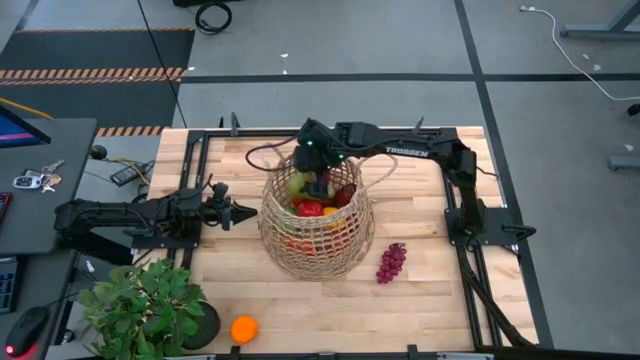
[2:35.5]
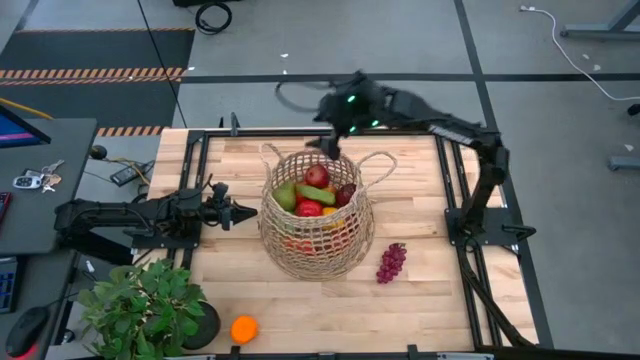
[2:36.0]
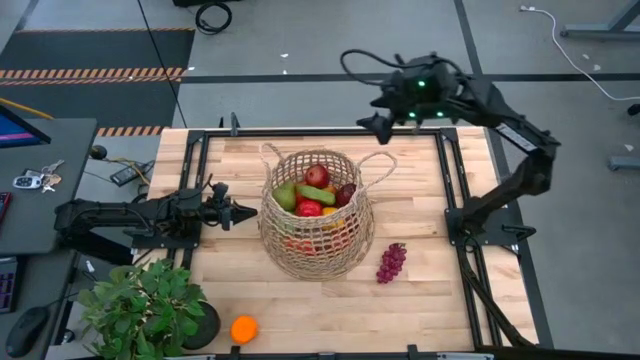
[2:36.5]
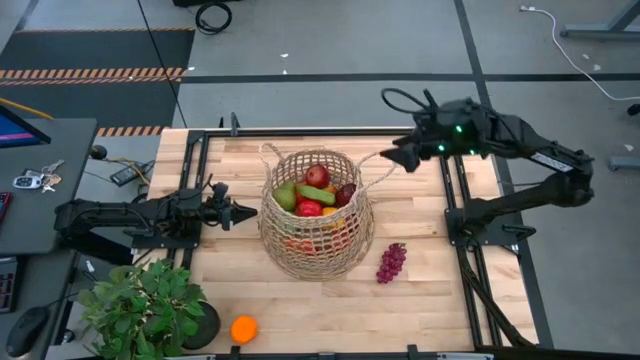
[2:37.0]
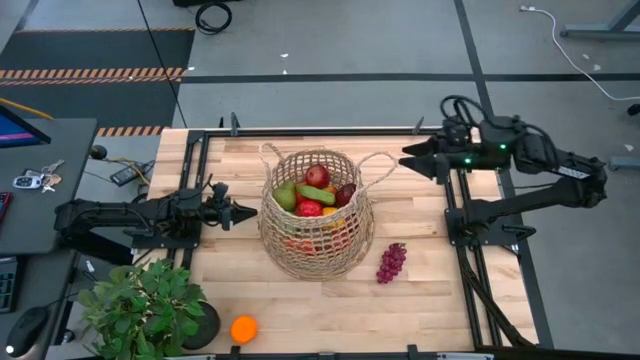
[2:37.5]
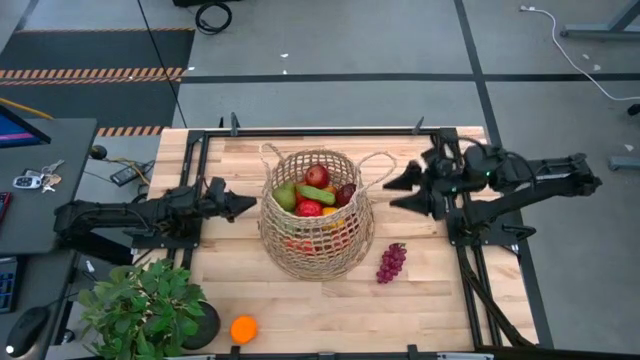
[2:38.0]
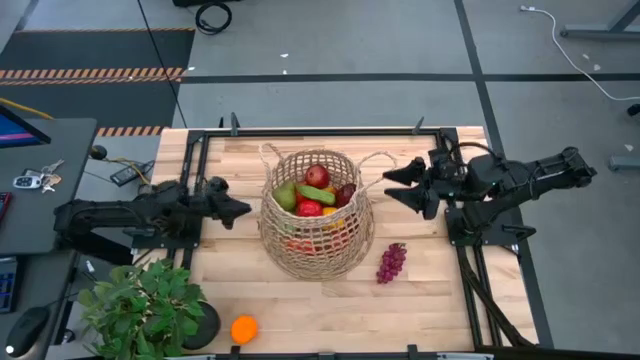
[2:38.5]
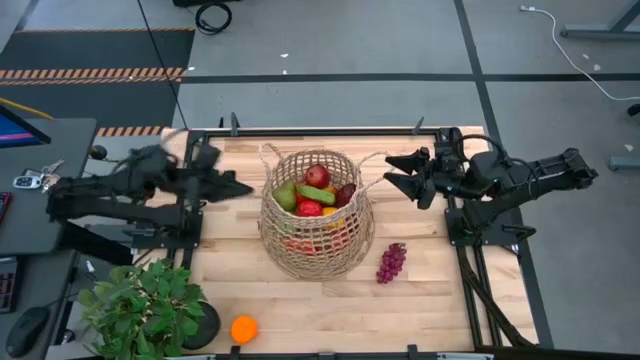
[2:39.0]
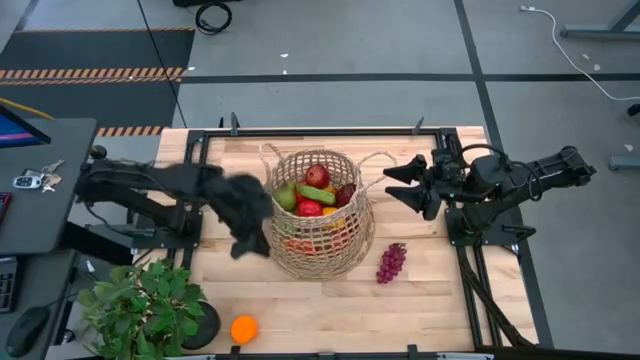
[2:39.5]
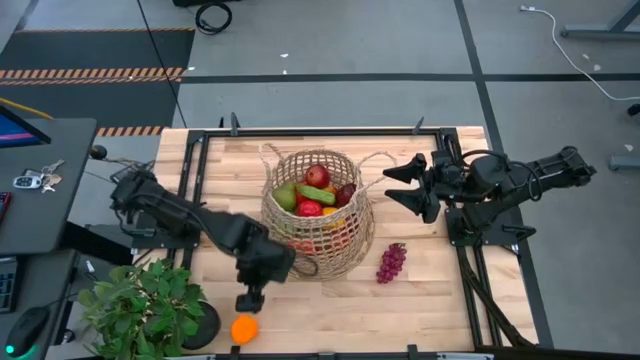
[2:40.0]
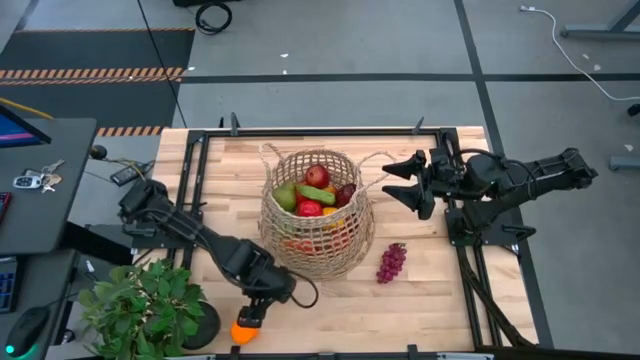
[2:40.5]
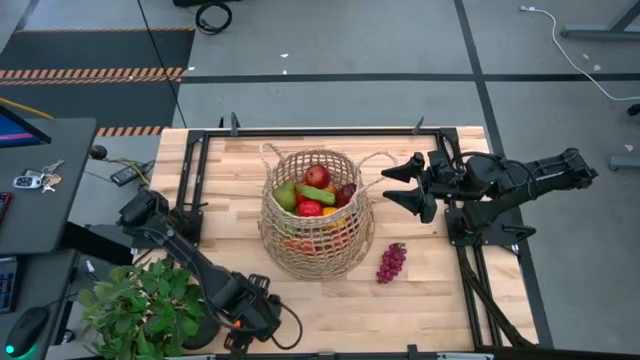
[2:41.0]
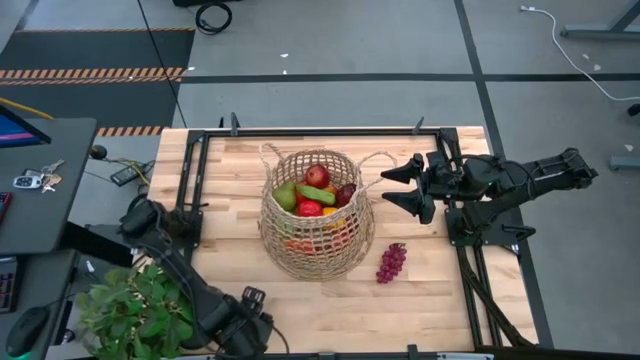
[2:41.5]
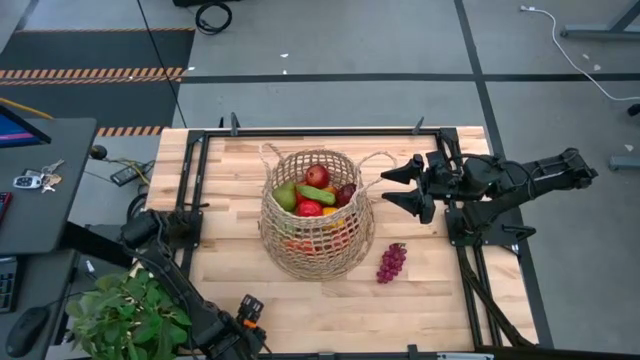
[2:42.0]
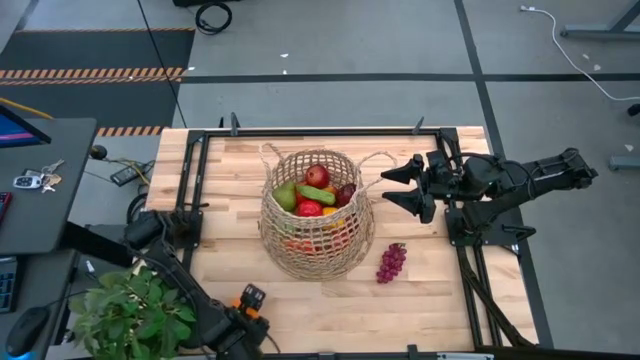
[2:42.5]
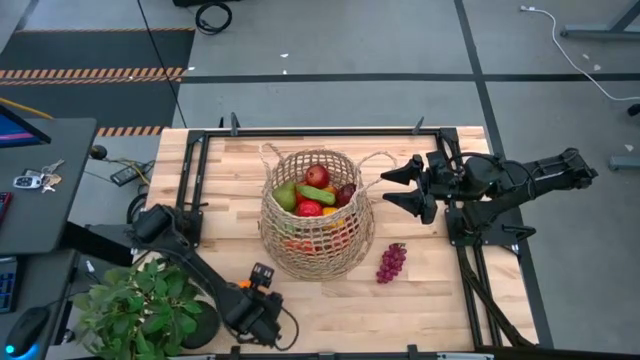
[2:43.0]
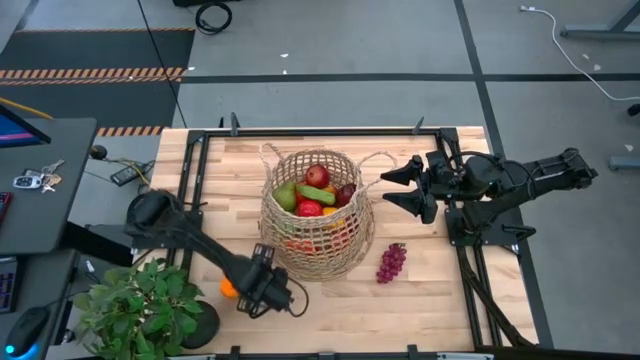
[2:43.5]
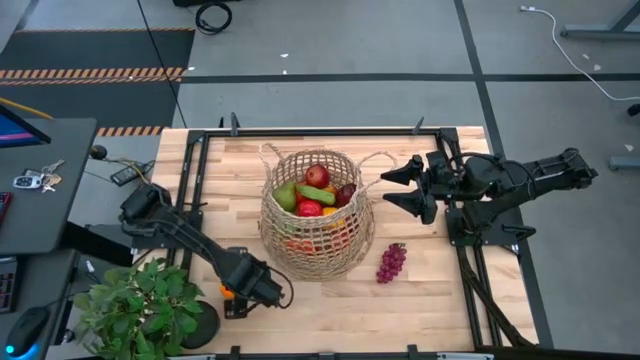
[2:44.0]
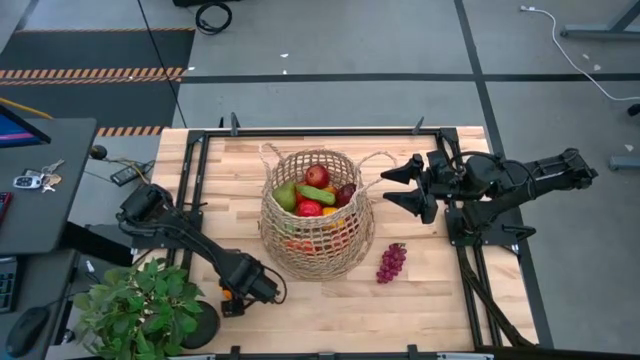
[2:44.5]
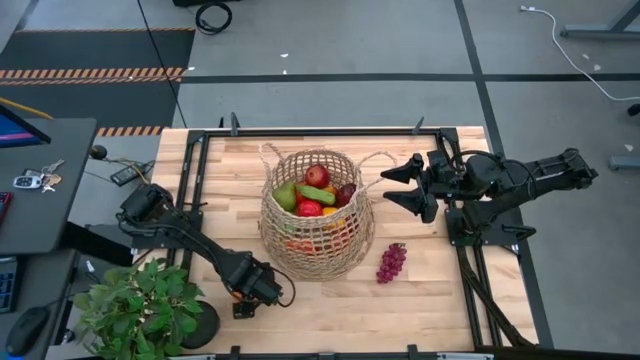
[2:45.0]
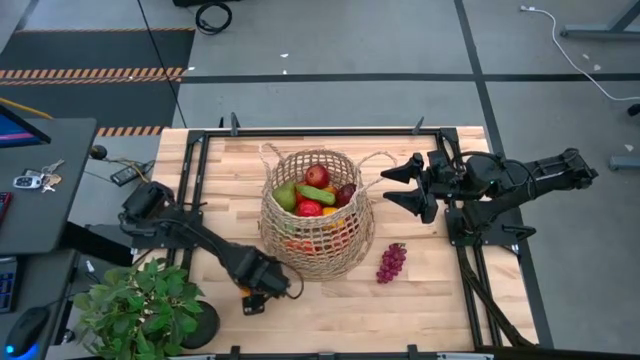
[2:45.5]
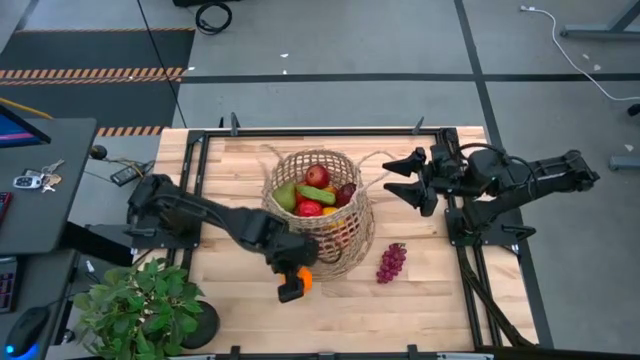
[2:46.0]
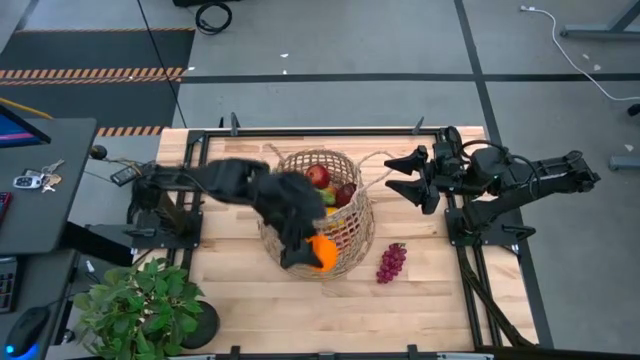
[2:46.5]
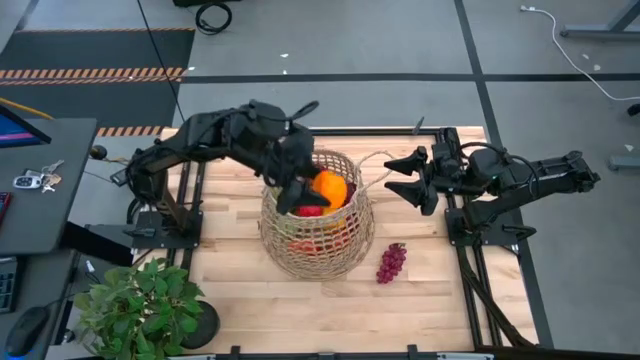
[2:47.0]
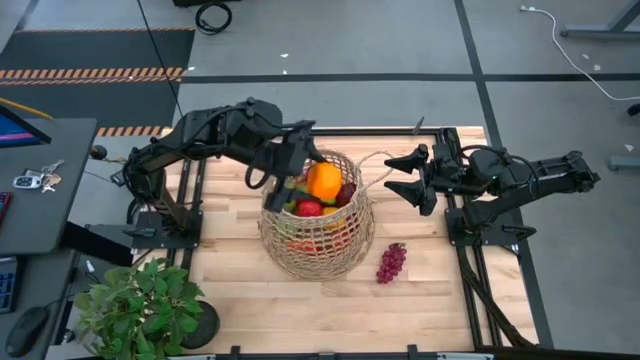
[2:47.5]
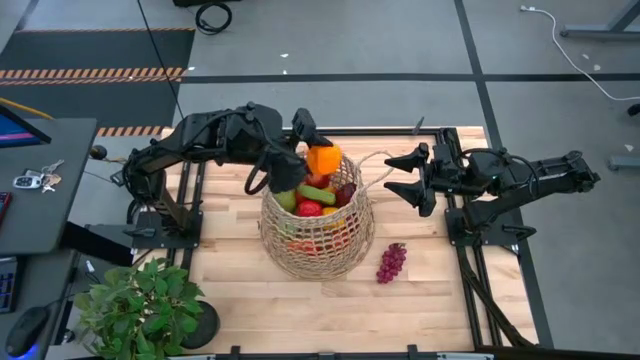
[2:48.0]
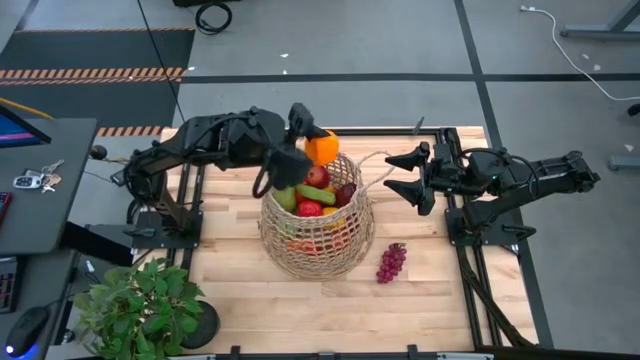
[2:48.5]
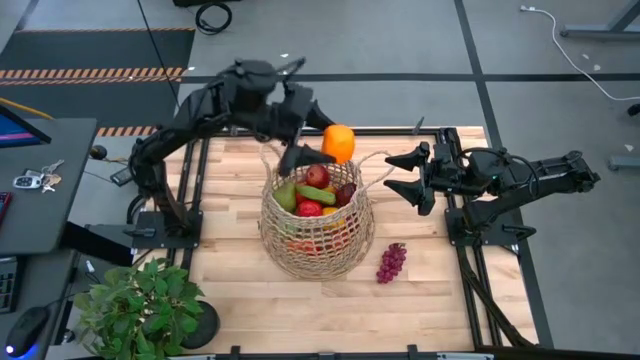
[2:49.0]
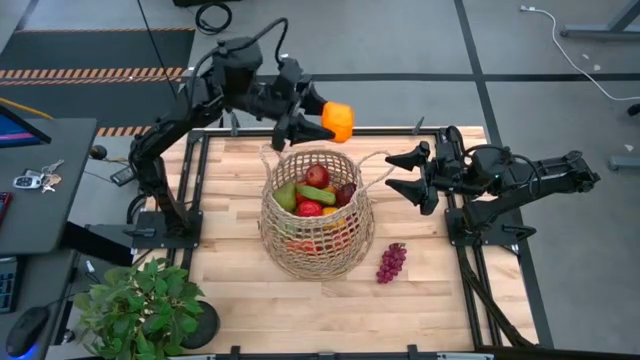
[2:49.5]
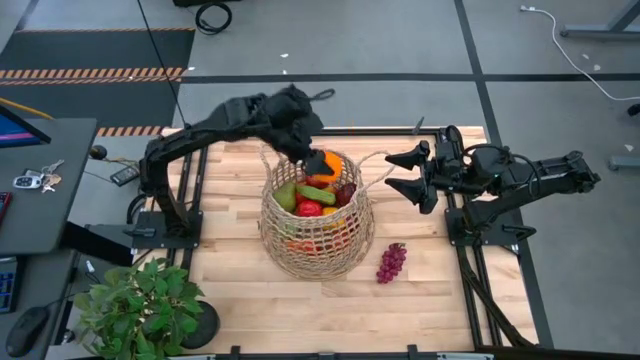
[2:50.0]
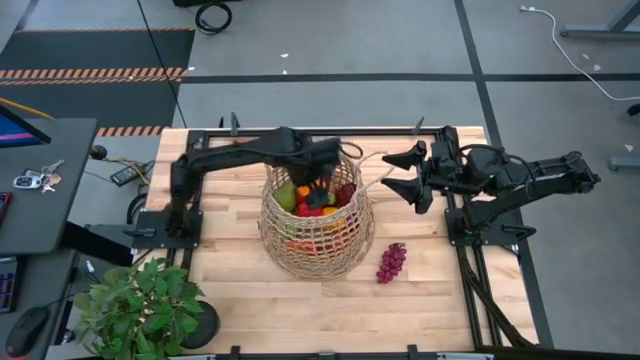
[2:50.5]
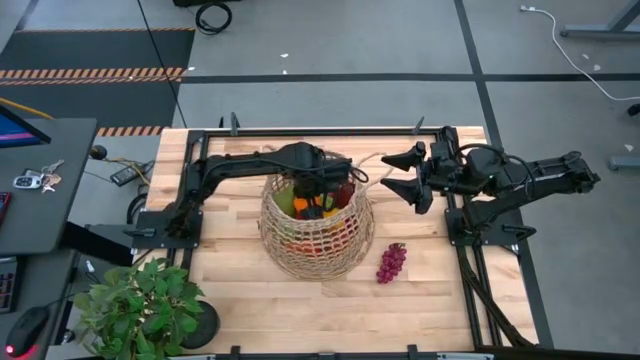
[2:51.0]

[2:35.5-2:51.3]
Task: Build produce basket
Put the orange tangerine into the basket

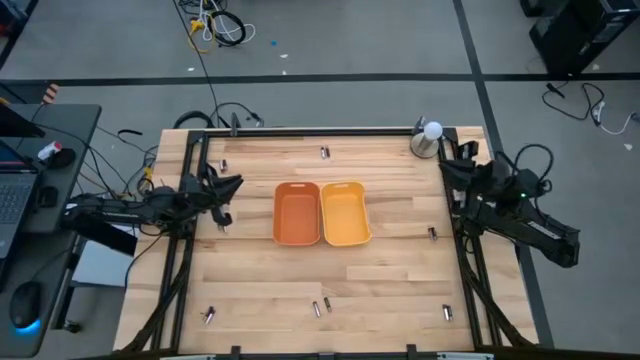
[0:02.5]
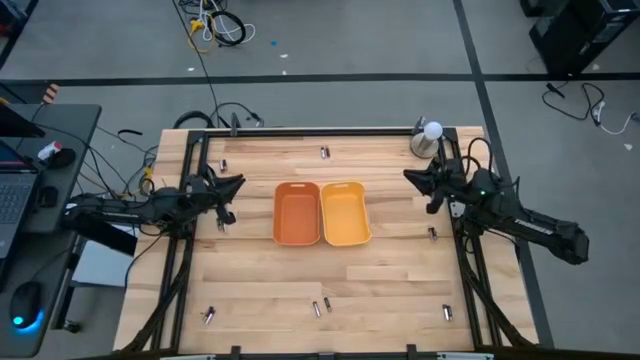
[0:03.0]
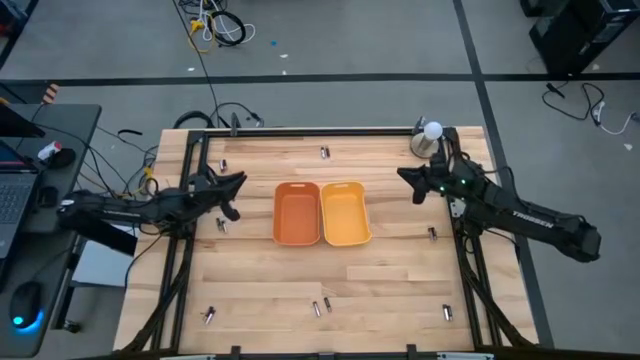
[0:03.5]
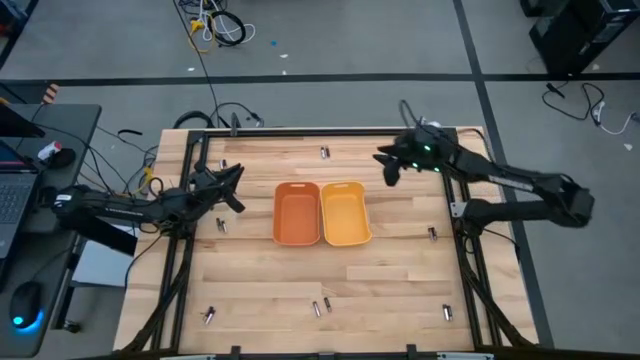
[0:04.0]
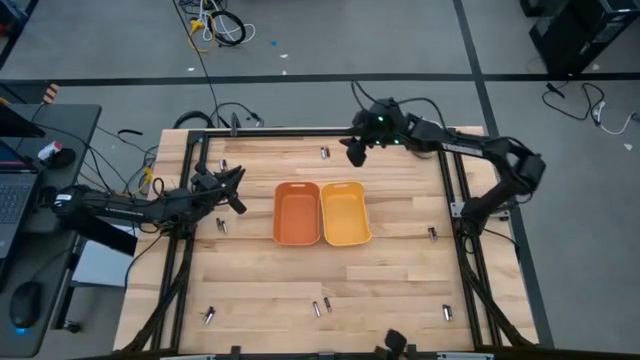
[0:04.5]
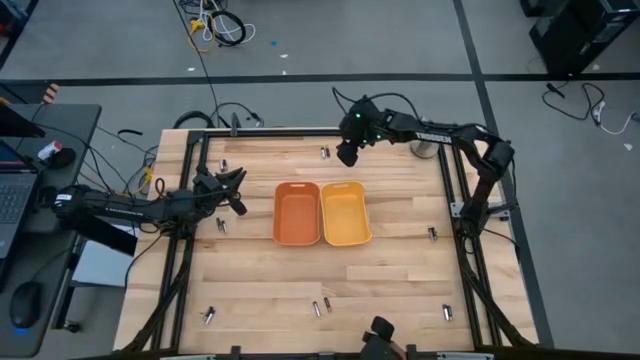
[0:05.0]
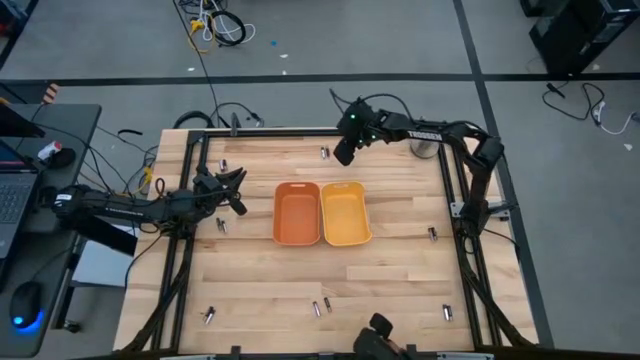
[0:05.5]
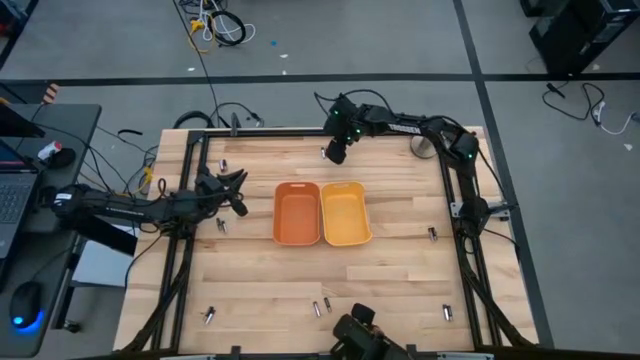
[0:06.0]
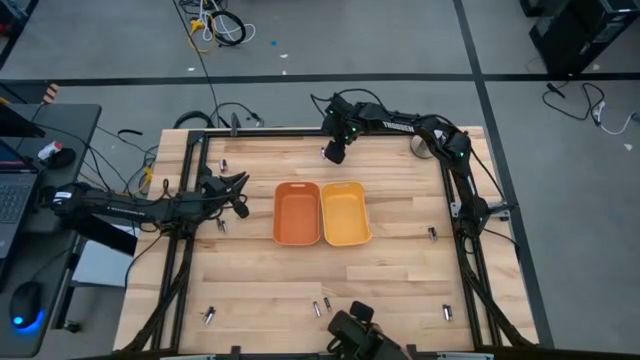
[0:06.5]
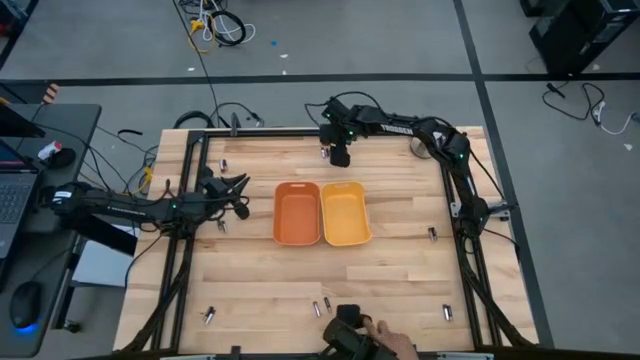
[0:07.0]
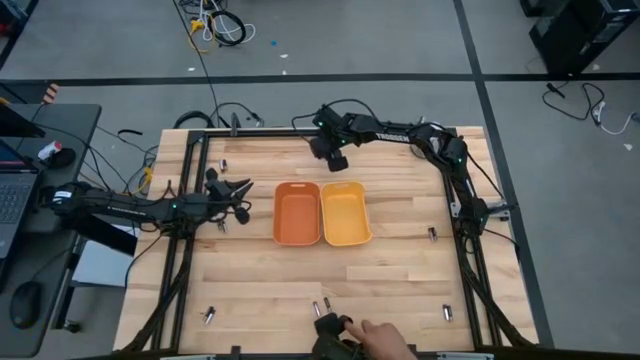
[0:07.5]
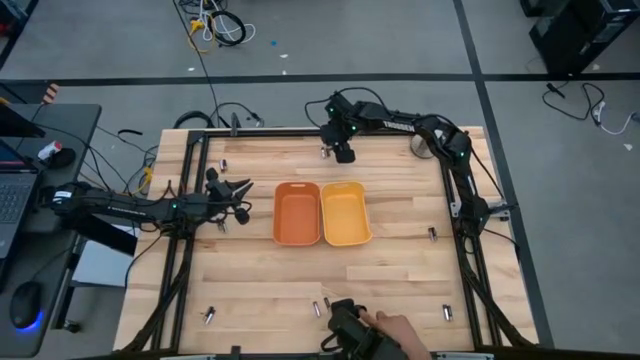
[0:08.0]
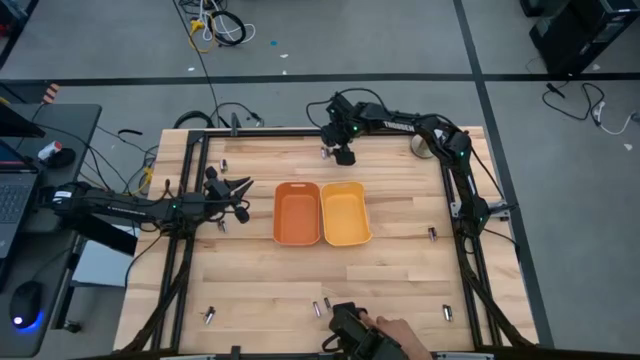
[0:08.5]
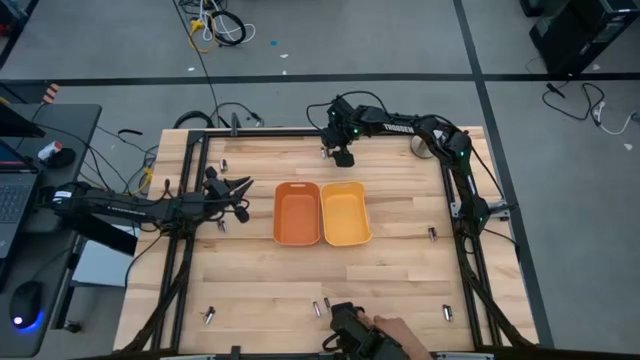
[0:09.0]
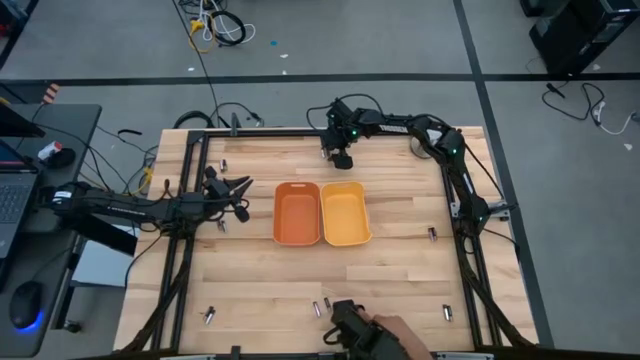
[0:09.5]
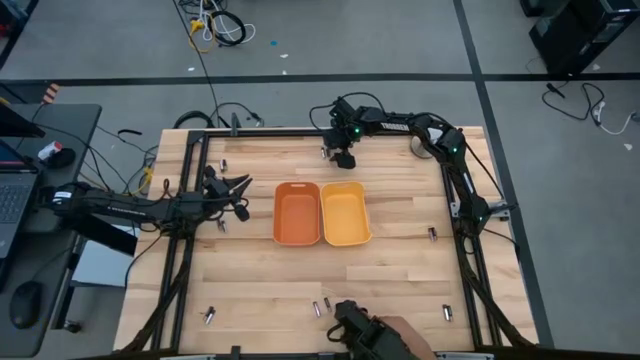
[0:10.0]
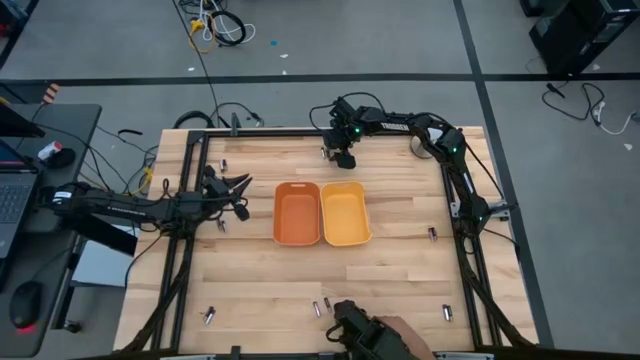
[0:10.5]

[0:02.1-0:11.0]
Task: Sort batteries
Put the black battery into the orange bin
